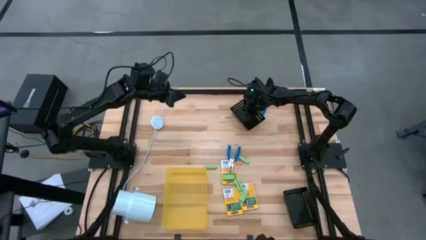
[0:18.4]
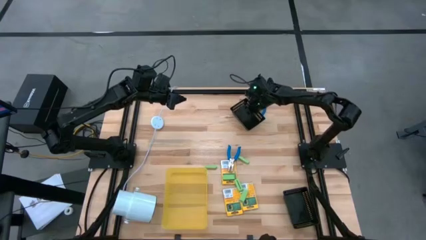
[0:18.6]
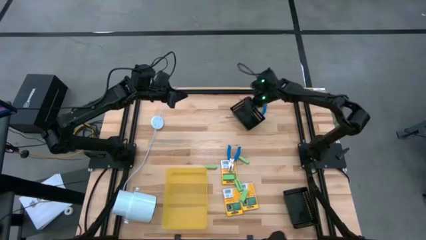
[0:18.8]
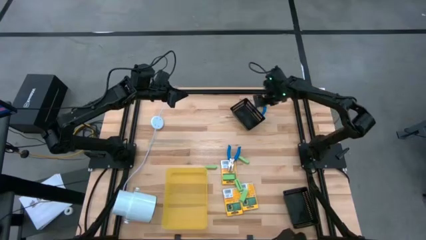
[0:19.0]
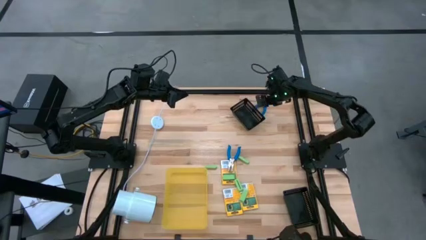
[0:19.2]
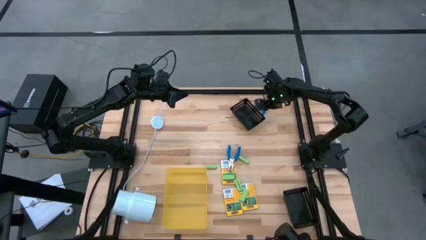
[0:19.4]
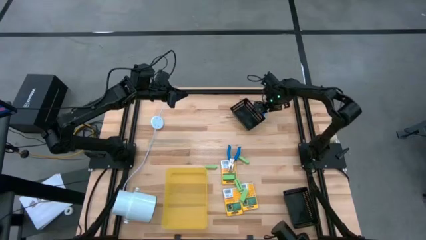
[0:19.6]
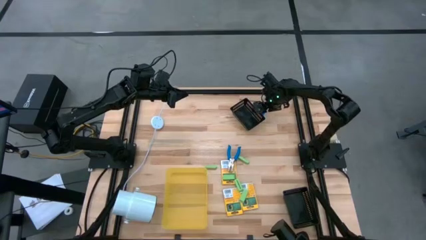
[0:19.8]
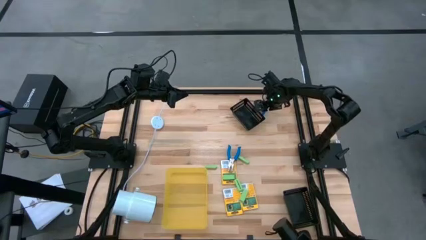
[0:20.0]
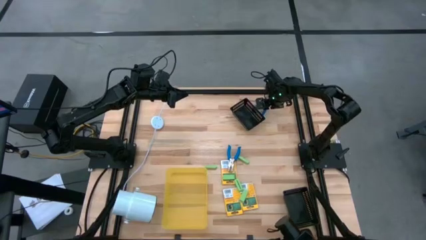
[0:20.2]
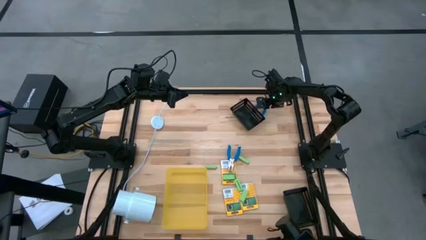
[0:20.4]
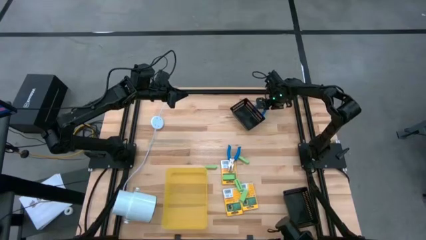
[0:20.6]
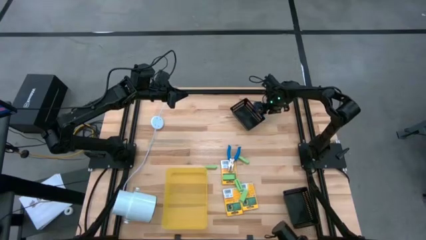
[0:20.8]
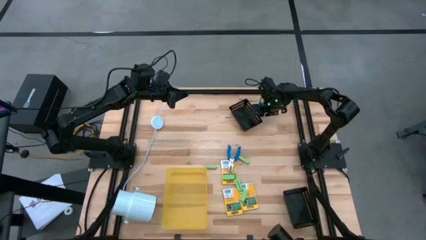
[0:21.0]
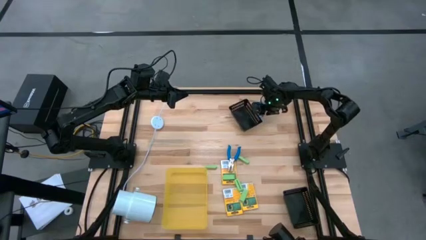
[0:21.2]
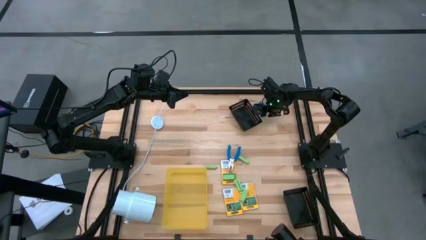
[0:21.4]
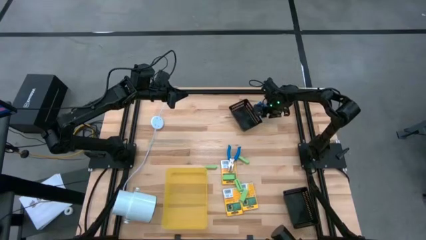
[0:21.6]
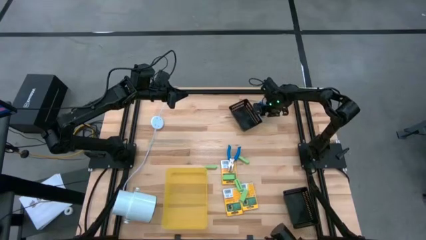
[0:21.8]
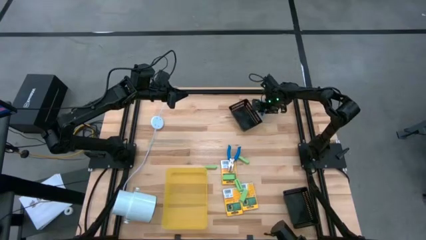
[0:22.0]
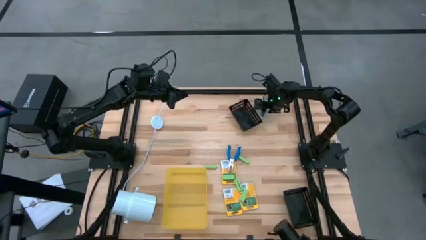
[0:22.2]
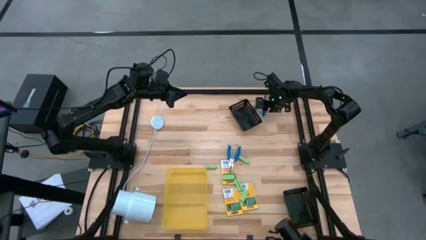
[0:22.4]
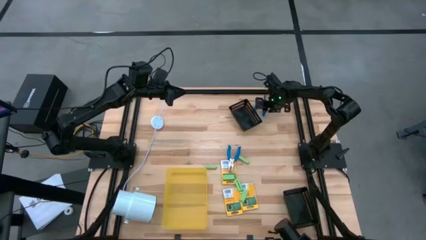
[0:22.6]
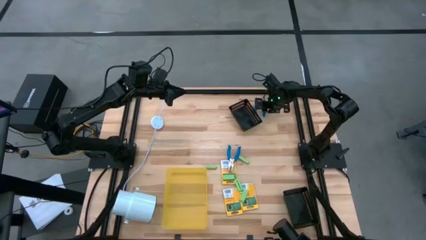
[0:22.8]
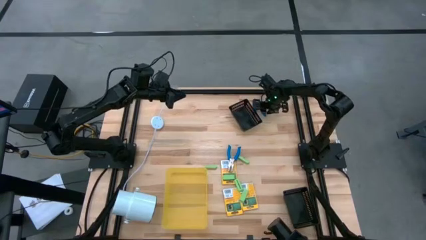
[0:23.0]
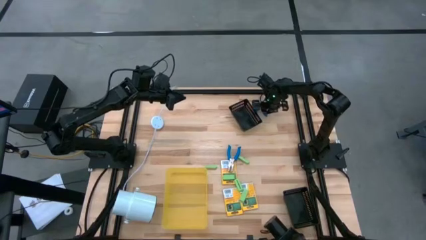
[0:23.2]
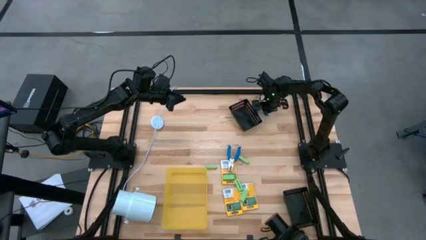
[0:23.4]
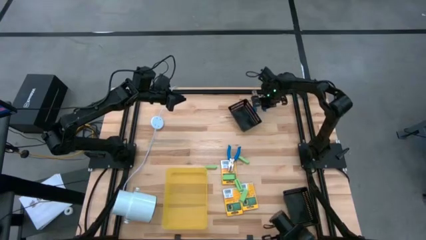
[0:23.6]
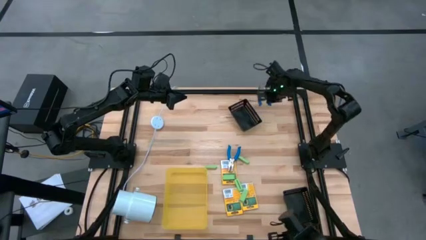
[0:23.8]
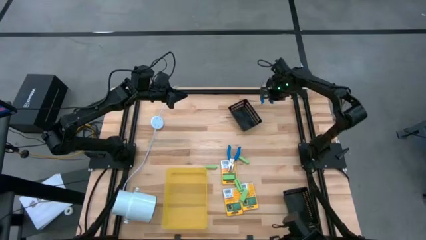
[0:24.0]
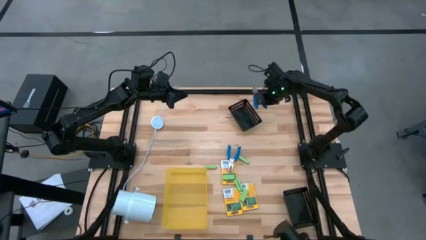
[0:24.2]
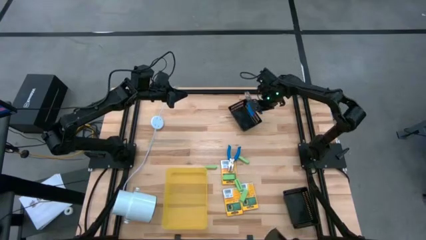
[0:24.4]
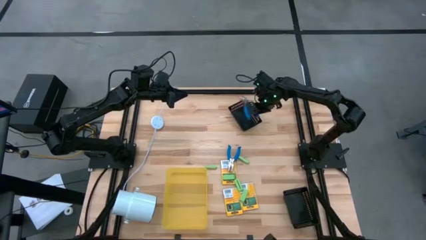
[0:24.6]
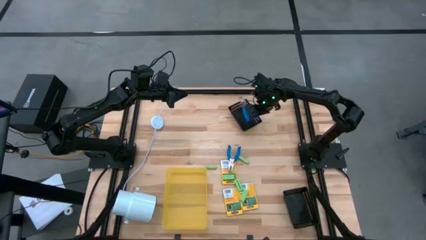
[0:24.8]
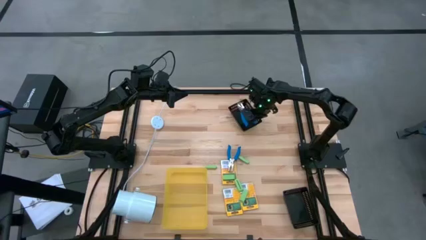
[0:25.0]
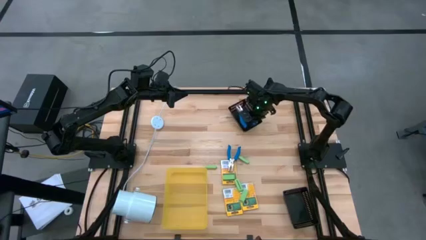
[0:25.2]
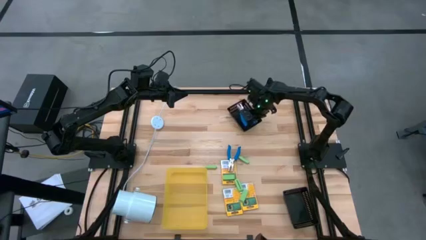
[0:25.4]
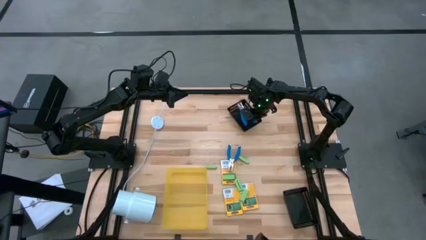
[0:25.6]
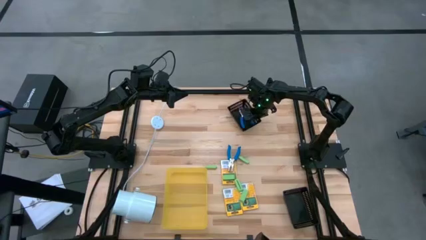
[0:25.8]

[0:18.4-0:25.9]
Task: Pick & Place School Supplies
Put the blue punch plier into the top black bin

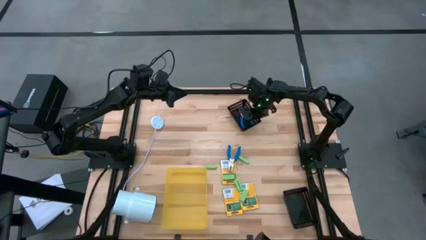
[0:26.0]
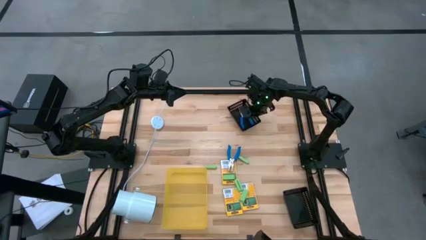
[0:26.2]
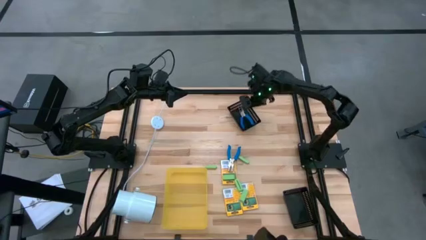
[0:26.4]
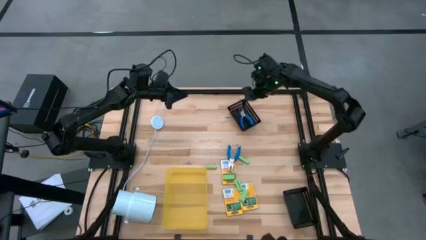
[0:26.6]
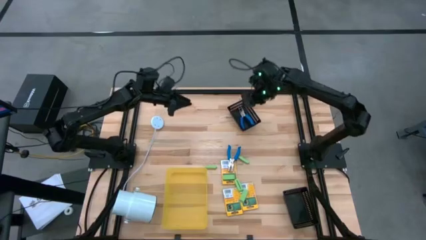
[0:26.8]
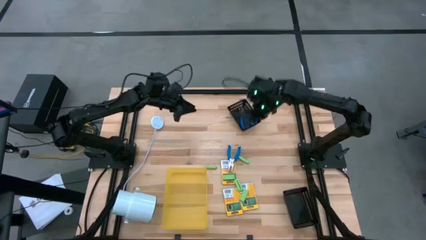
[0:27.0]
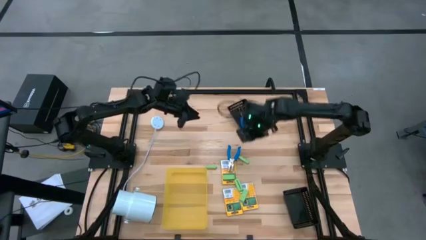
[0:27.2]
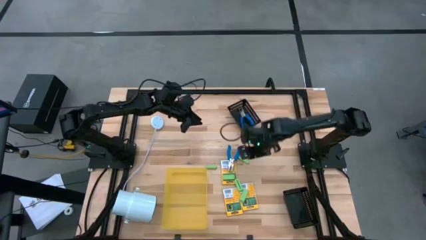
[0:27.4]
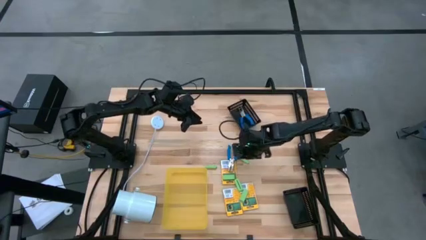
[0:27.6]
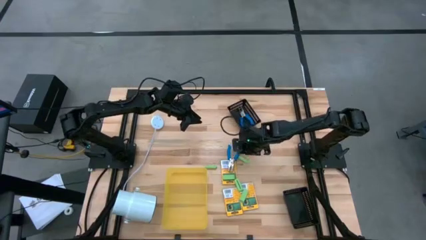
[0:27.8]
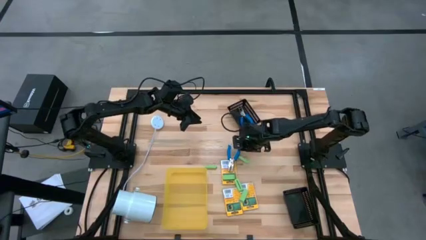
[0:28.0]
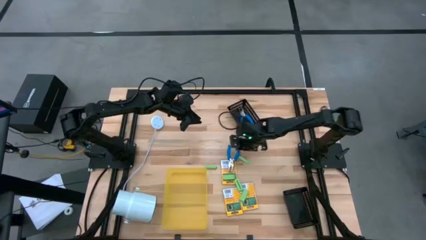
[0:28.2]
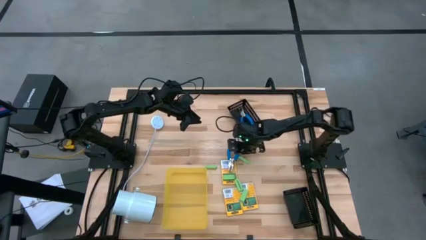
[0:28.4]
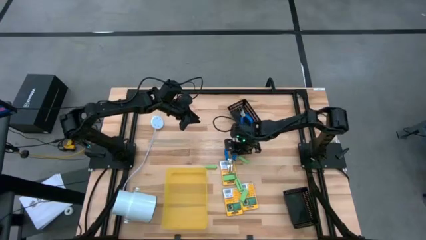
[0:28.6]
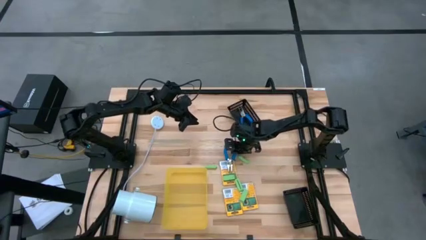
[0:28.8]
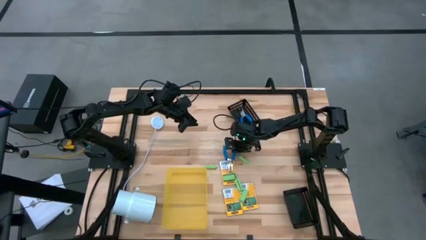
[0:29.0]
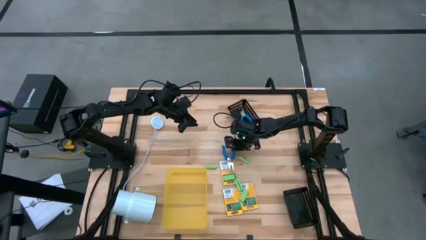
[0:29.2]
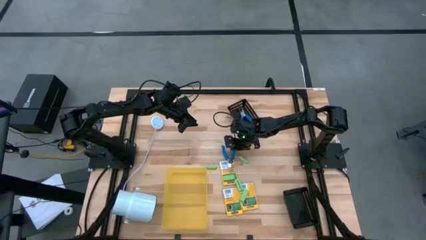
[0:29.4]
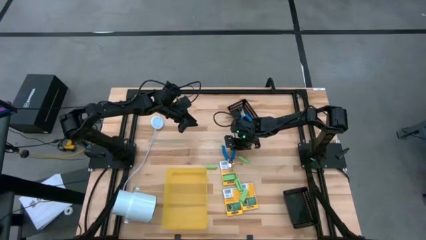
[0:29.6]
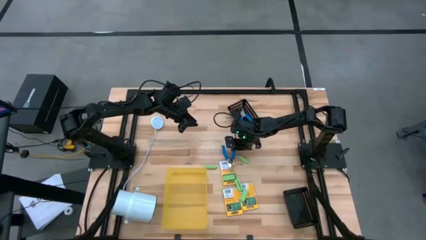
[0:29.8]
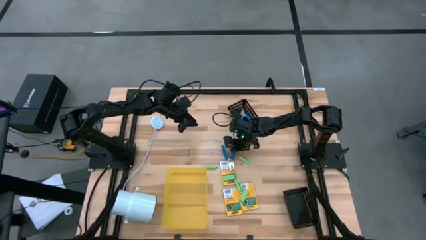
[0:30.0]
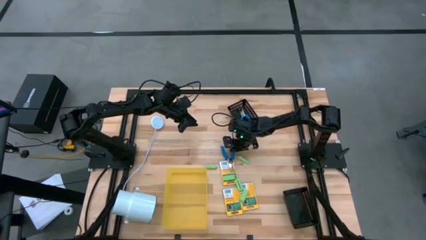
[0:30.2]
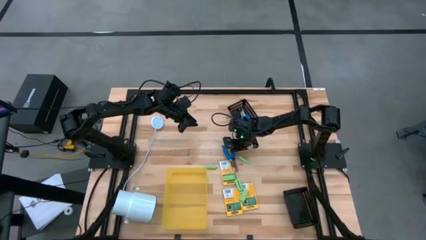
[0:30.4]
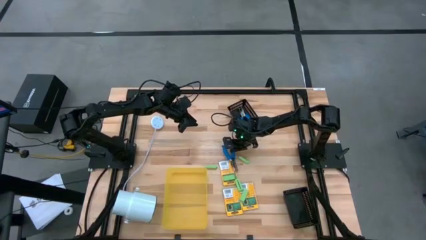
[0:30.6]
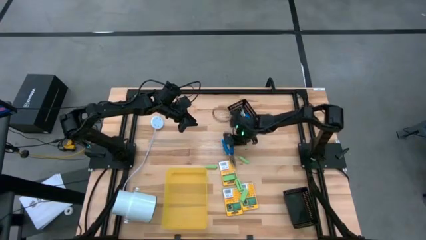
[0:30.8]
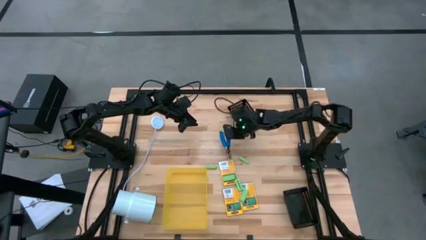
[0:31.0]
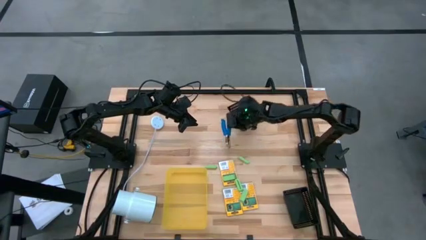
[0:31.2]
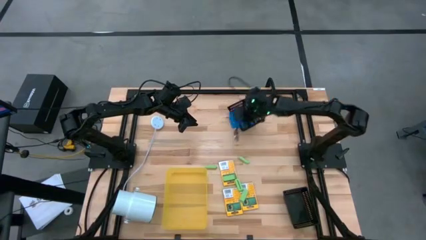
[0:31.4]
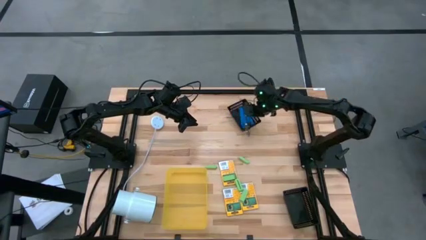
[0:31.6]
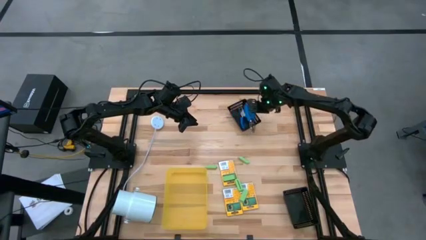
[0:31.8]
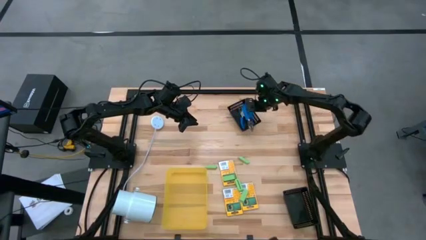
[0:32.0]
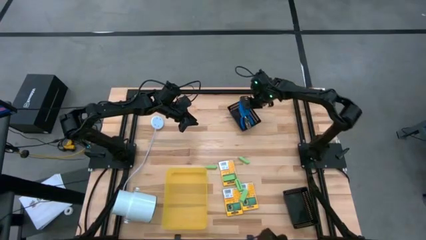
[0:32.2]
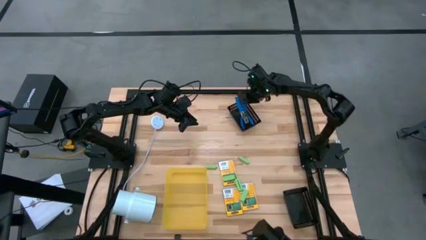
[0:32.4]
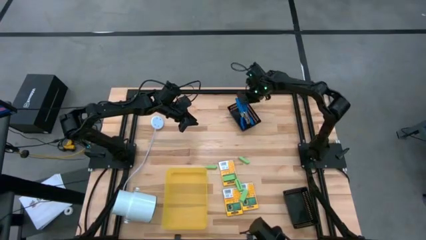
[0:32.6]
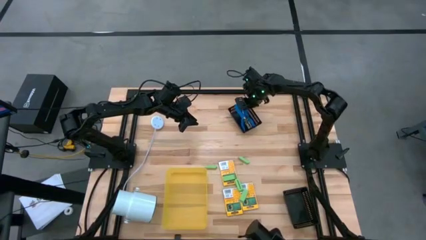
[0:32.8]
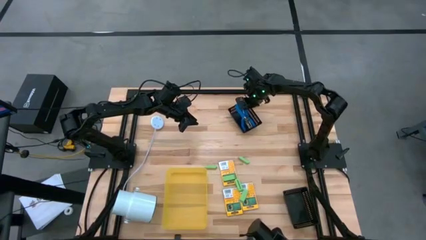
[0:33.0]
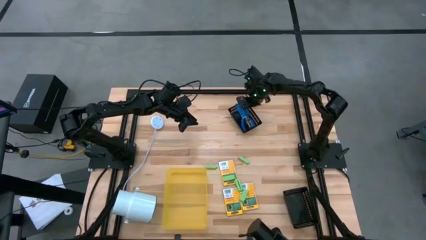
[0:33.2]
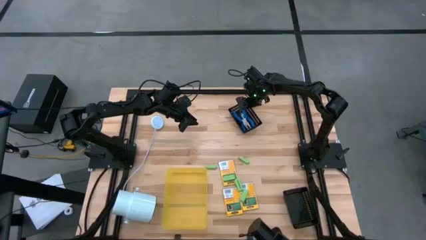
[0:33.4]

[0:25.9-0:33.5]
Put the blue punch plier into the top black bin

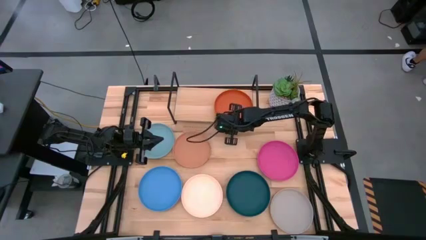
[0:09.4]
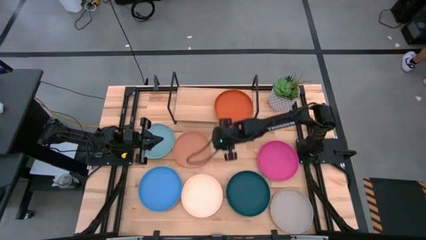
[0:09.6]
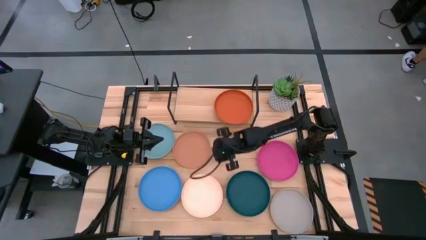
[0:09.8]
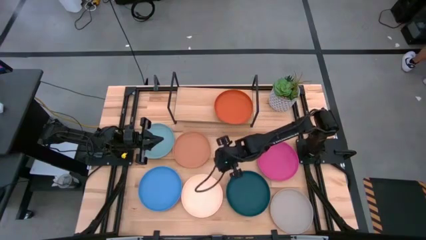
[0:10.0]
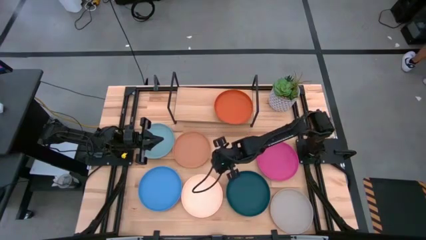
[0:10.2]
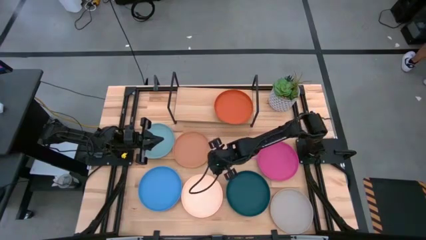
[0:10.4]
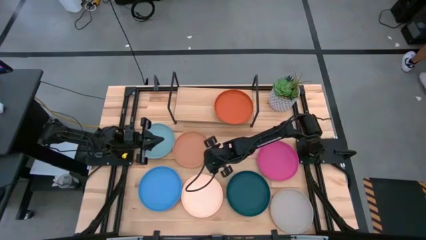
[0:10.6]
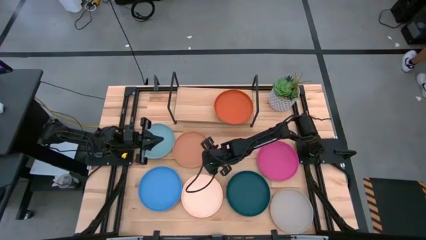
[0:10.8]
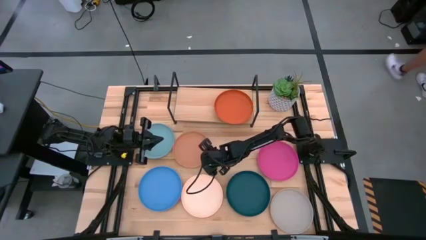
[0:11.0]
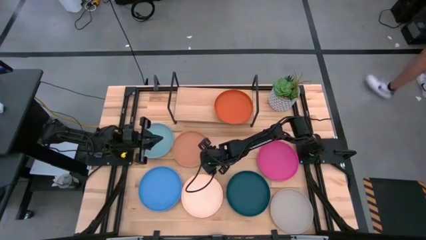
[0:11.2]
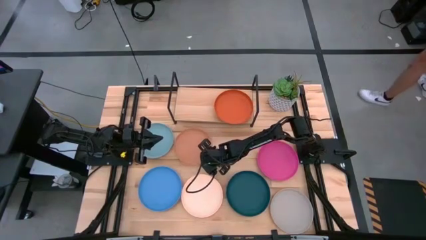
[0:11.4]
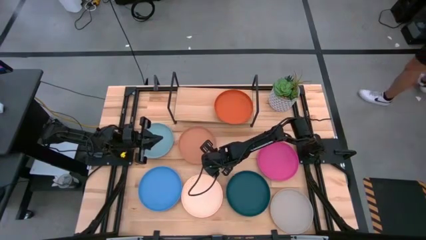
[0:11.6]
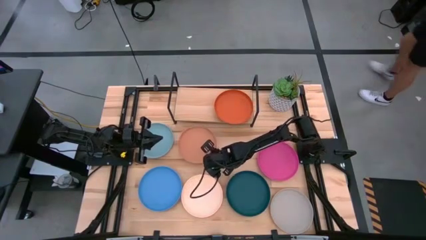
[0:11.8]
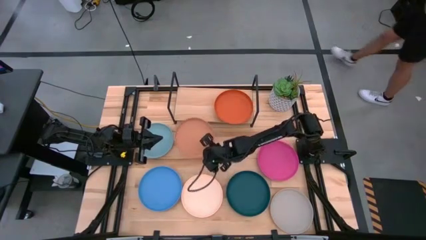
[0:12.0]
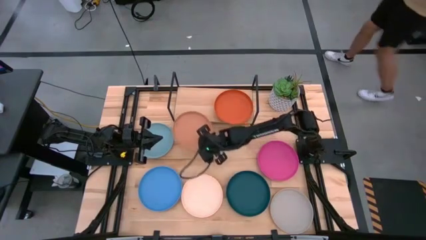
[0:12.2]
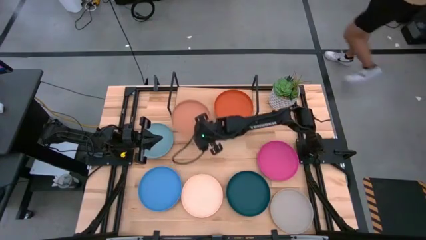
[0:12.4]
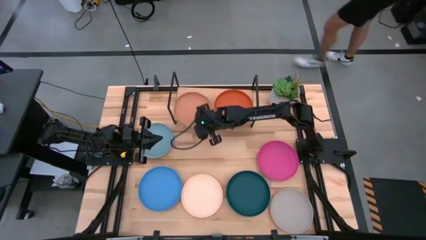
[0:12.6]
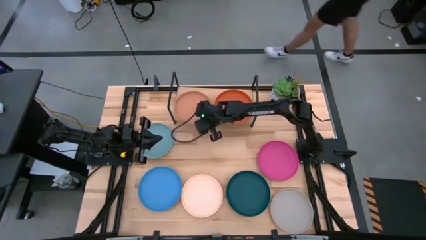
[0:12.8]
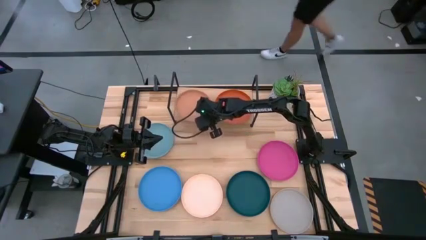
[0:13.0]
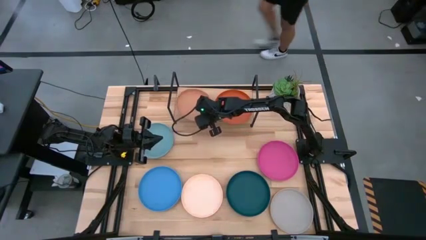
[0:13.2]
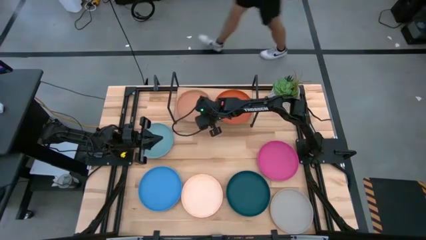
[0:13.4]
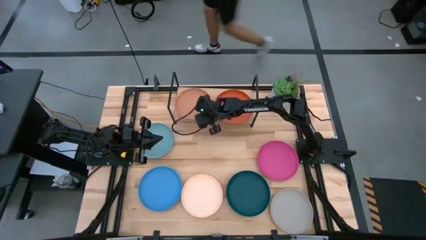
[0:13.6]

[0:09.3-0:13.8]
Task: Place and stack plates onto a shelf
Put the brown plate on the shelf
